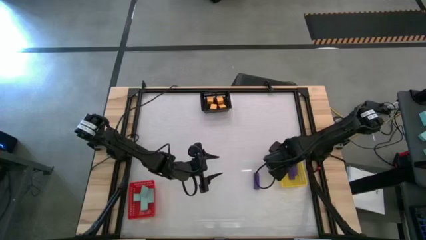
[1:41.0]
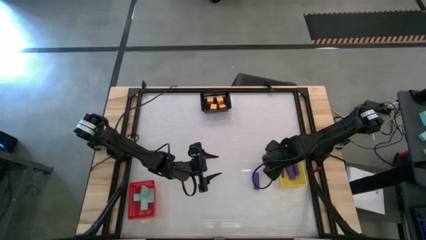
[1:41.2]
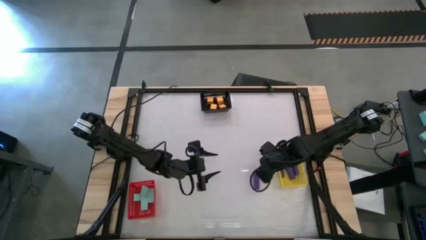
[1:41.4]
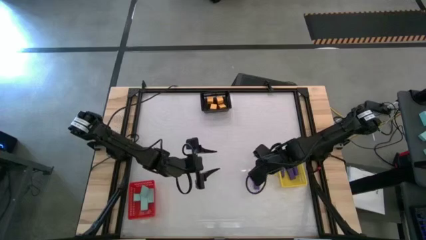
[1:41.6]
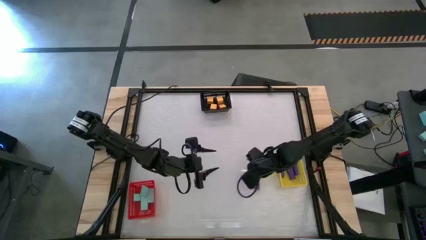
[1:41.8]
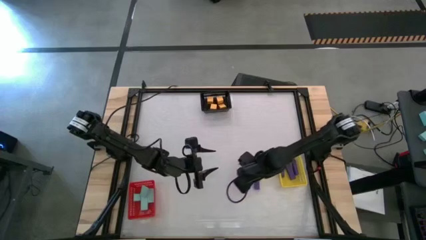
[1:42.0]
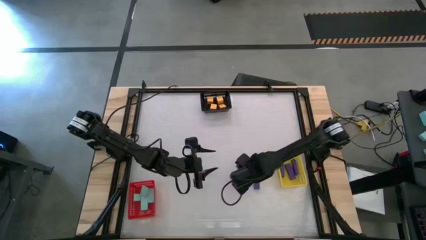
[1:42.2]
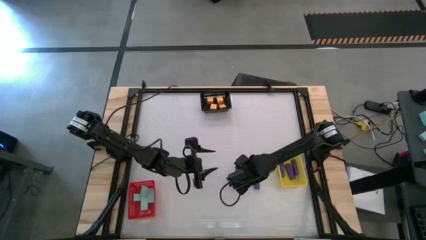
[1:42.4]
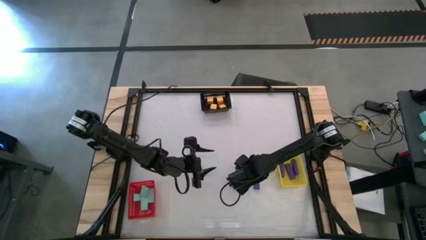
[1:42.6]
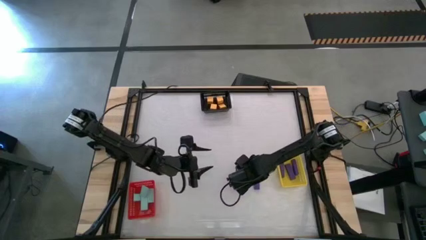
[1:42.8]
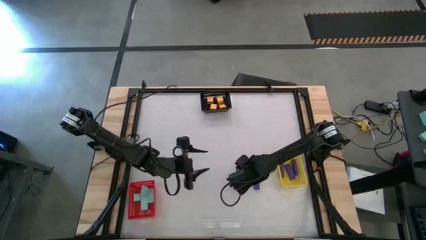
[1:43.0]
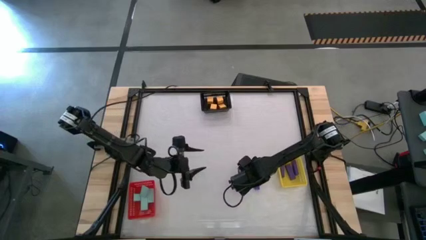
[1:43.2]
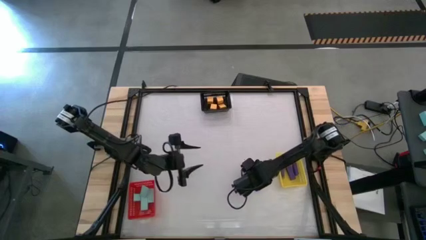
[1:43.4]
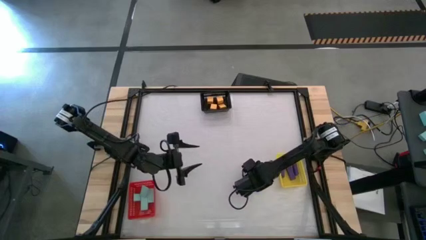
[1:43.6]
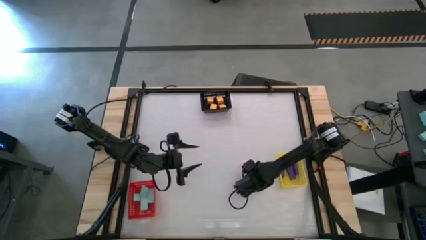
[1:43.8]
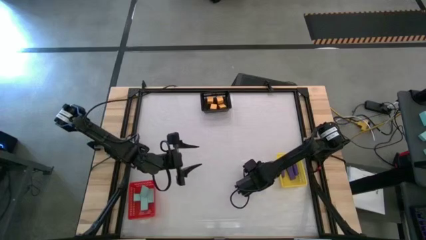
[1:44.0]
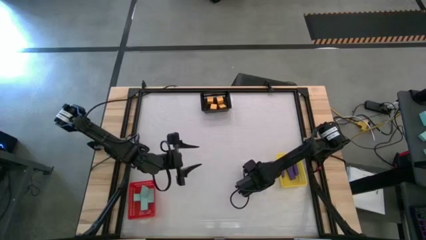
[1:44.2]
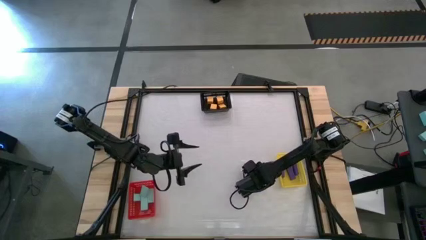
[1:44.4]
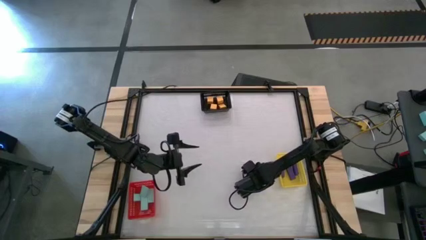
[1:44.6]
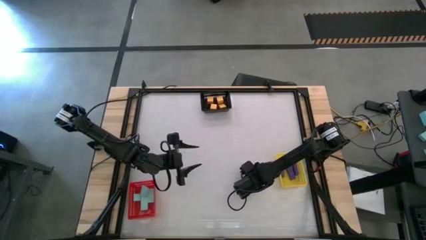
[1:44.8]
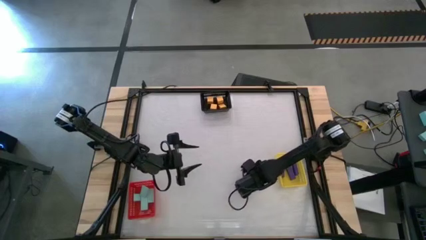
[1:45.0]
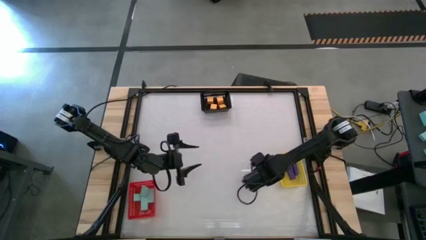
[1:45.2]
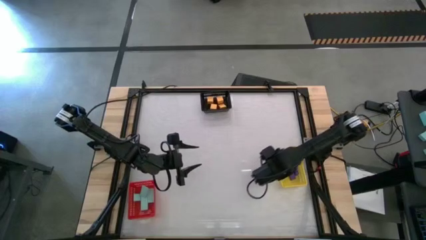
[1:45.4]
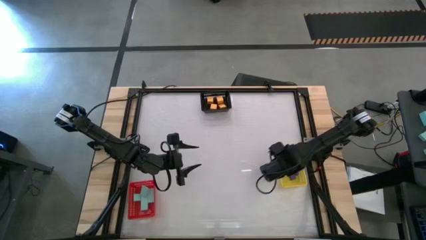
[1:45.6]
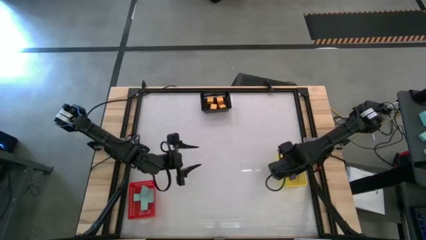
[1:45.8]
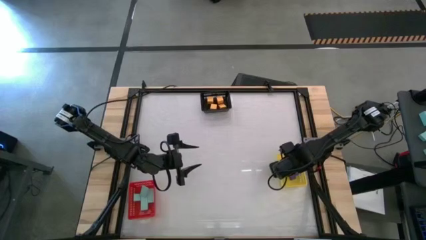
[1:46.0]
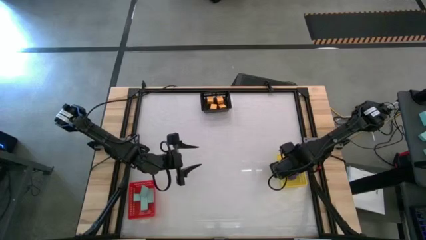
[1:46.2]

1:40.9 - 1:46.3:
Task: Sort & place blocks by color
Put the purple block into the yellow bin

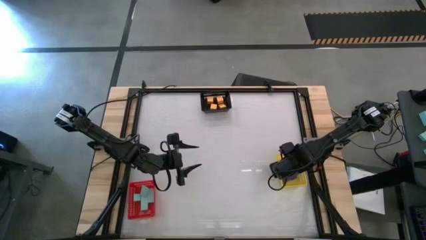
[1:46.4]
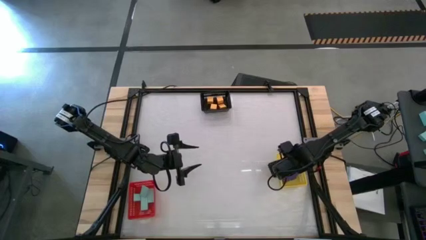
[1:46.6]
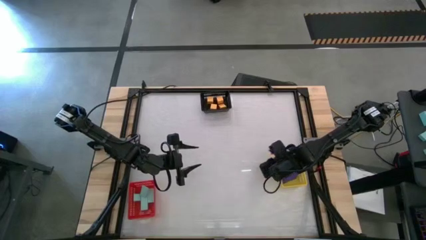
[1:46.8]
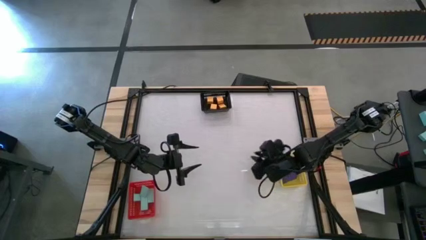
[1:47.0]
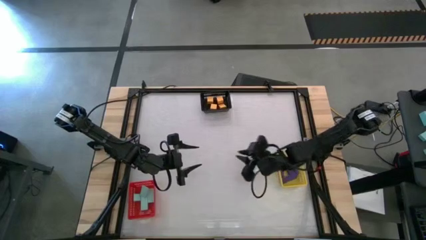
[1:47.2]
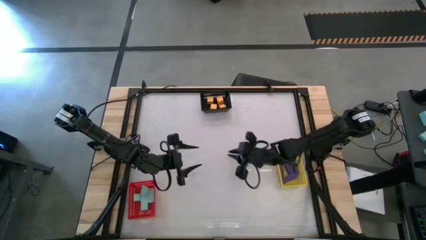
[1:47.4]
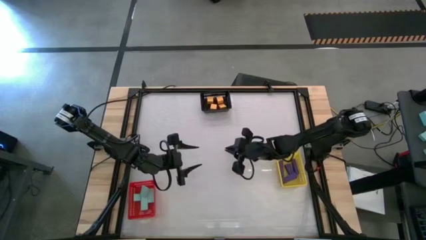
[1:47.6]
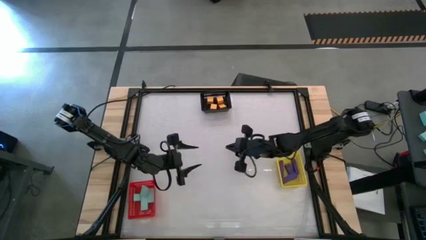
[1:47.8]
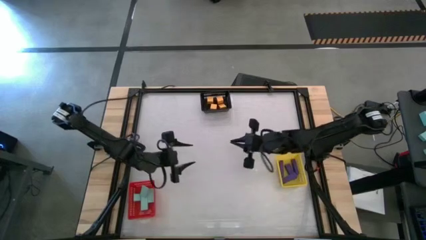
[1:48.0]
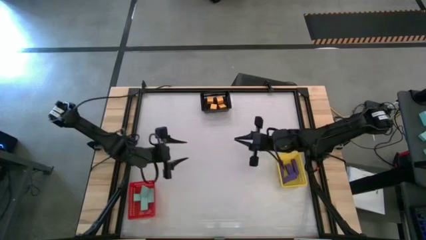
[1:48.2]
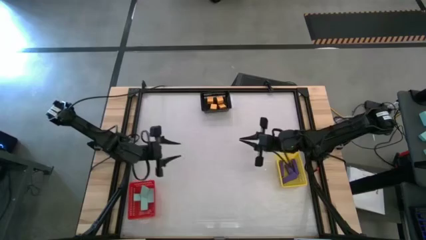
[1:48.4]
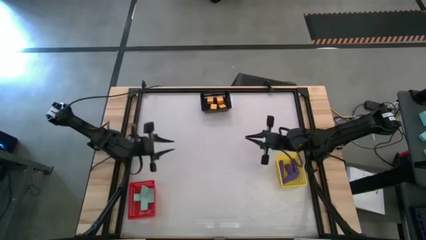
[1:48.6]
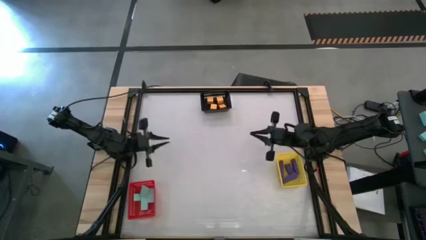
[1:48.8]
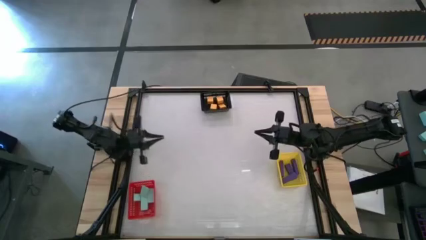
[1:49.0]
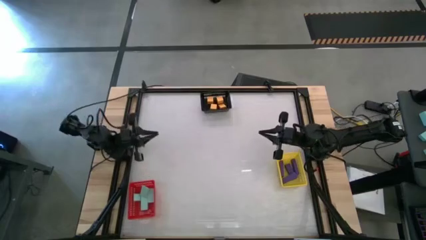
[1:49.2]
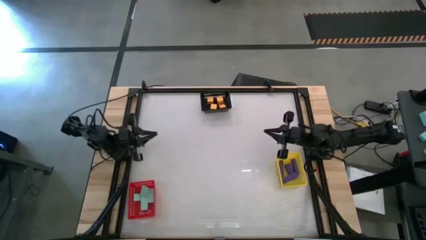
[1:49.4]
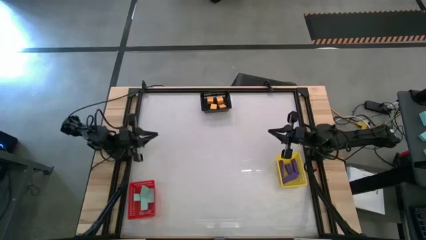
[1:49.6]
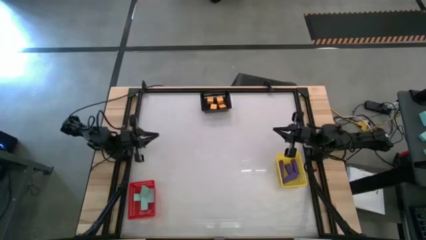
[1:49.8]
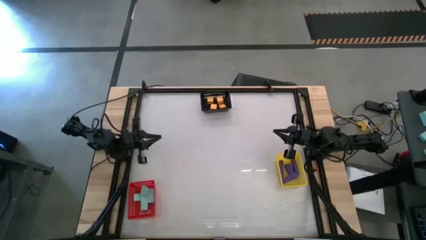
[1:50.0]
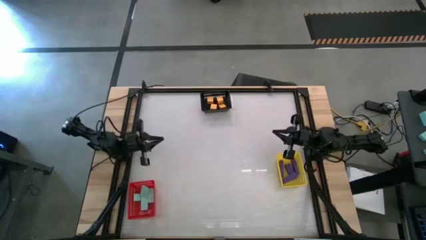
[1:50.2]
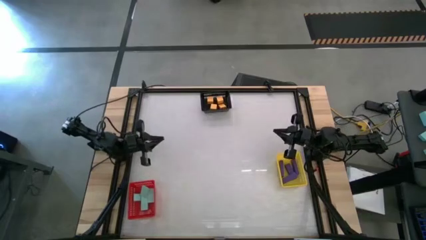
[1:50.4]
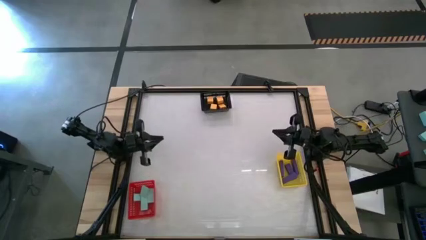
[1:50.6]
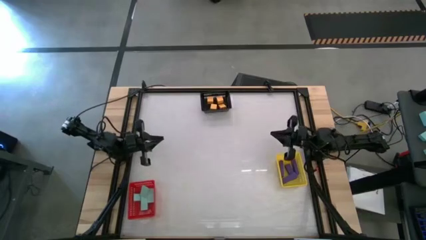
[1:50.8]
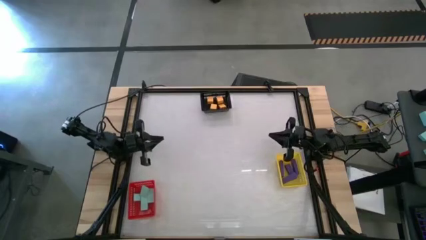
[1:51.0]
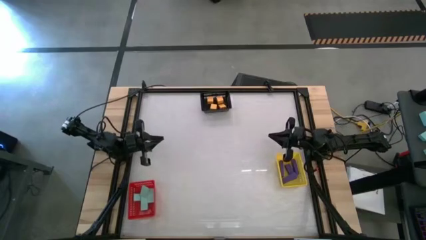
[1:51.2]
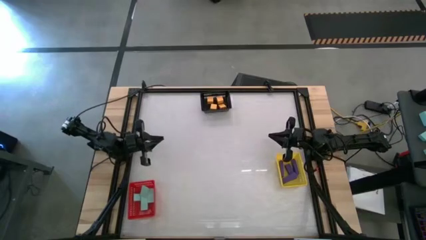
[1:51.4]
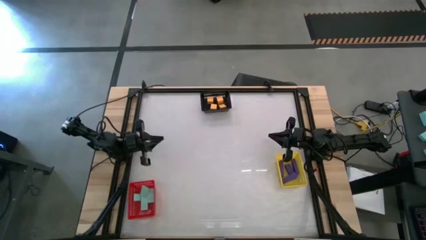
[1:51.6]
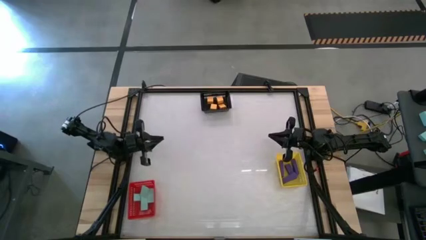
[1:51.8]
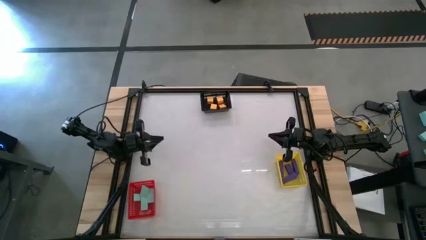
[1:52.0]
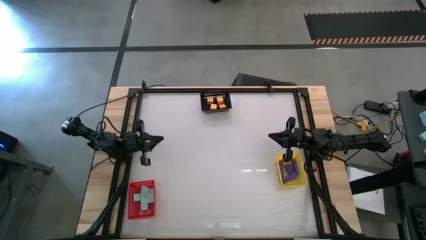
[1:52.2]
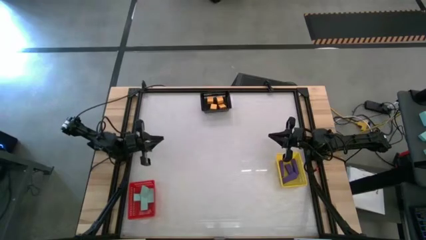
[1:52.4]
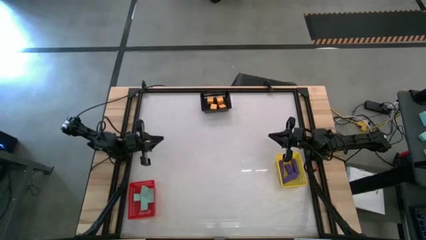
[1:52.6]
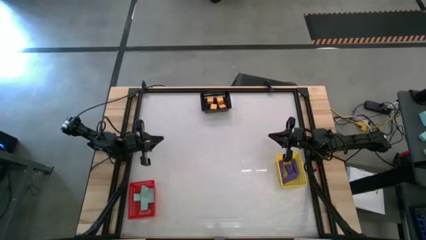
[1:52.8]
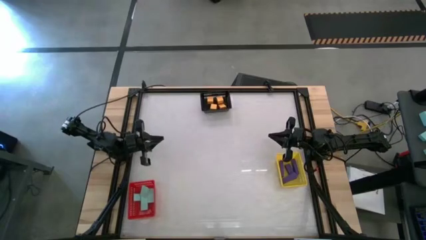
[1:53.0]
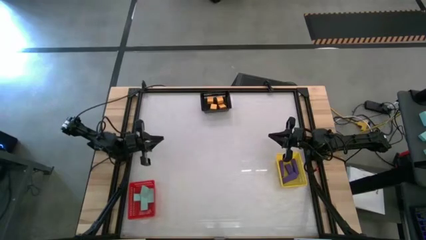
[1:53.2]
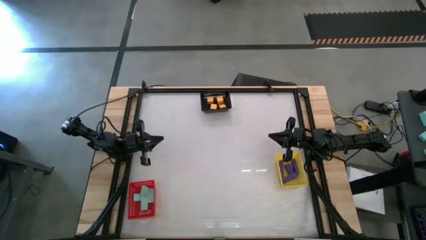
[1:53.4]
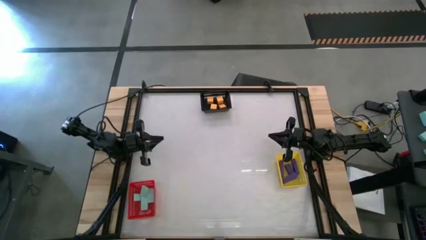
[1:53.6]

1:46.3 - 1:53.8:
Return to Home Position
